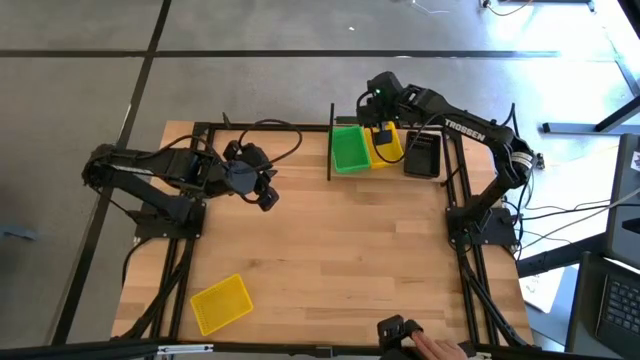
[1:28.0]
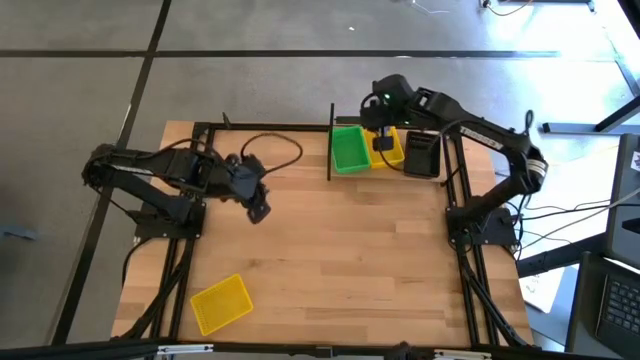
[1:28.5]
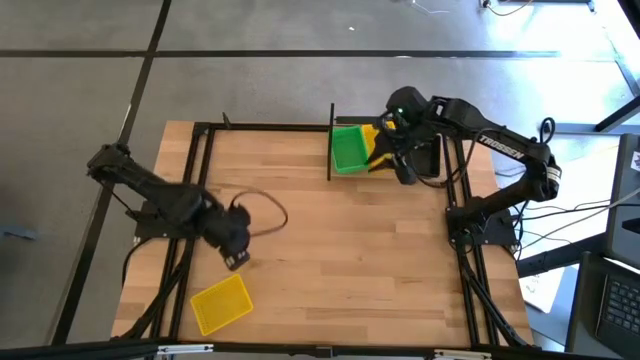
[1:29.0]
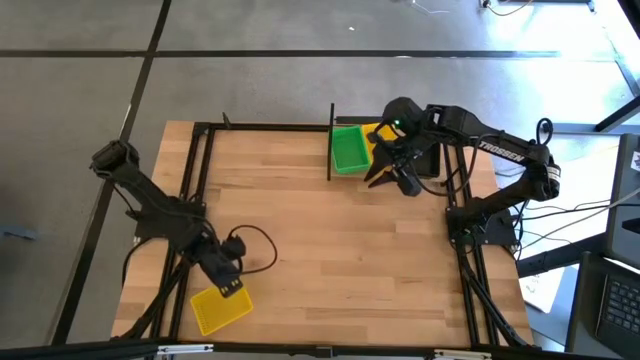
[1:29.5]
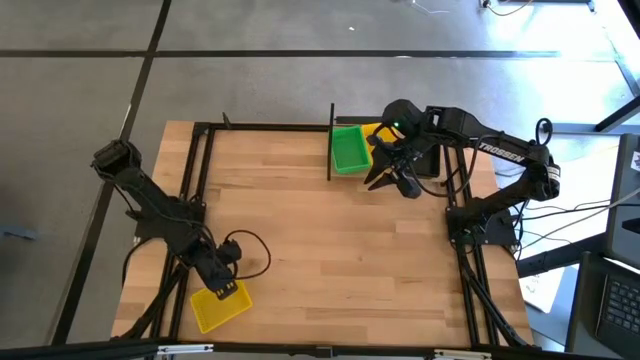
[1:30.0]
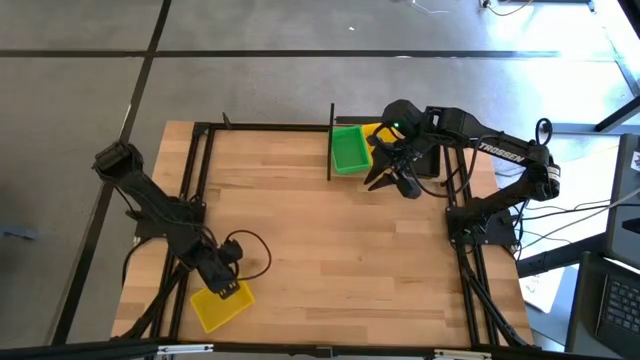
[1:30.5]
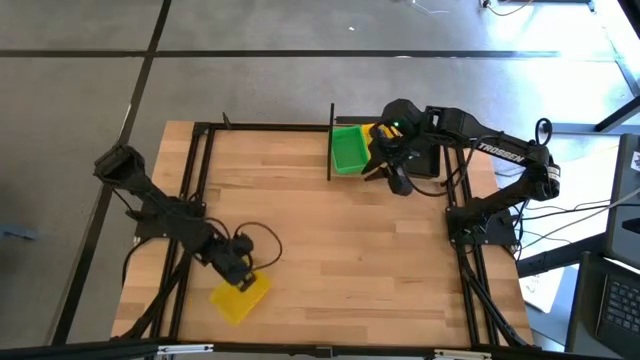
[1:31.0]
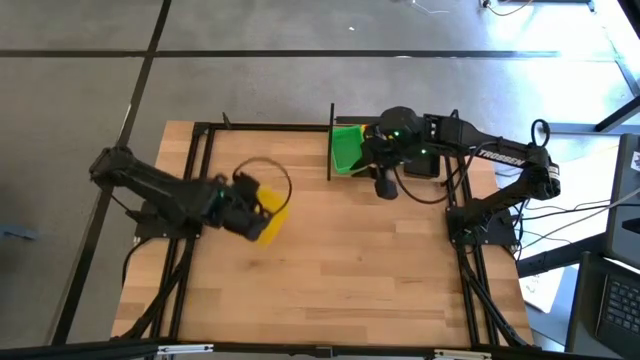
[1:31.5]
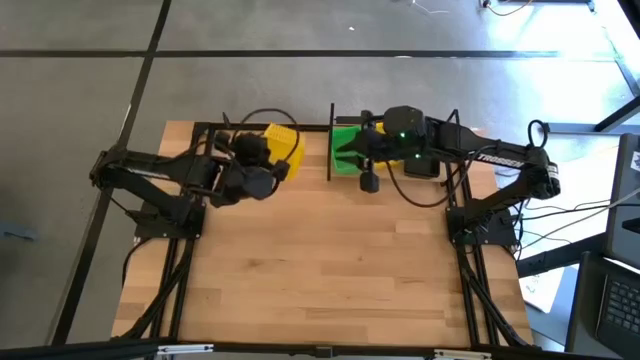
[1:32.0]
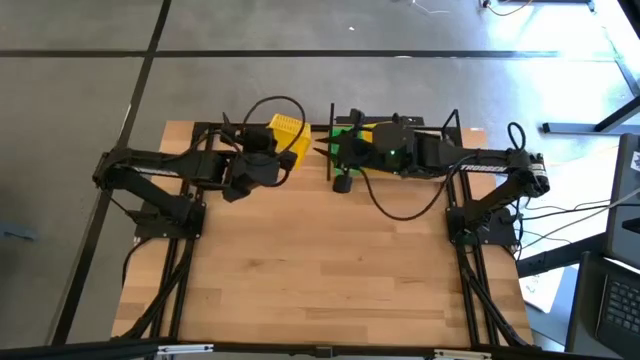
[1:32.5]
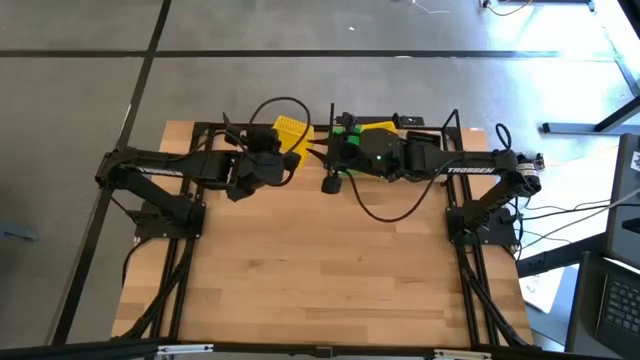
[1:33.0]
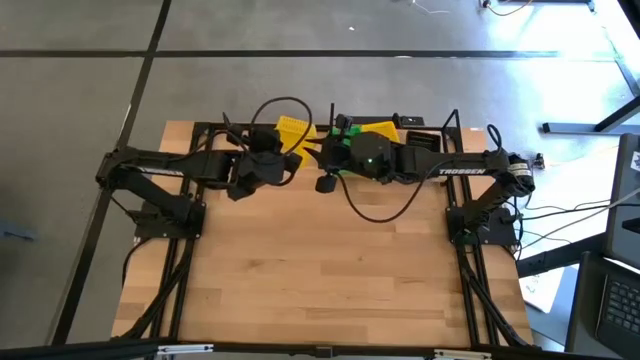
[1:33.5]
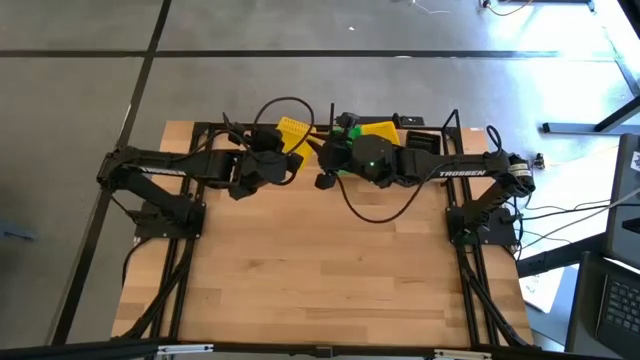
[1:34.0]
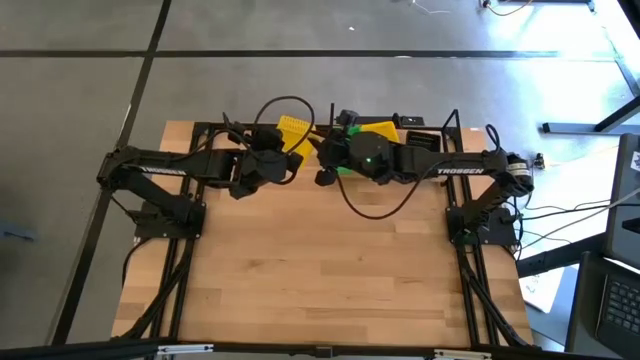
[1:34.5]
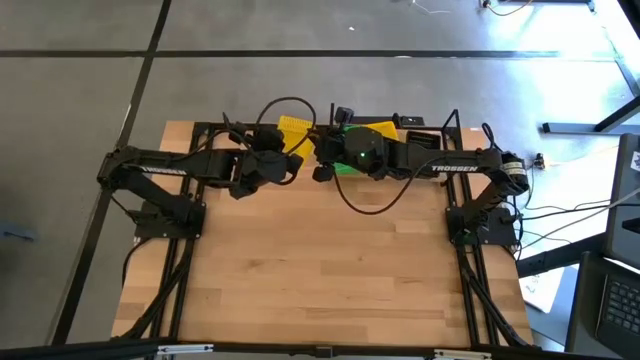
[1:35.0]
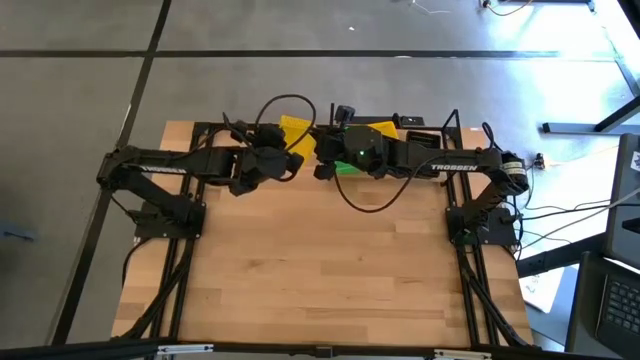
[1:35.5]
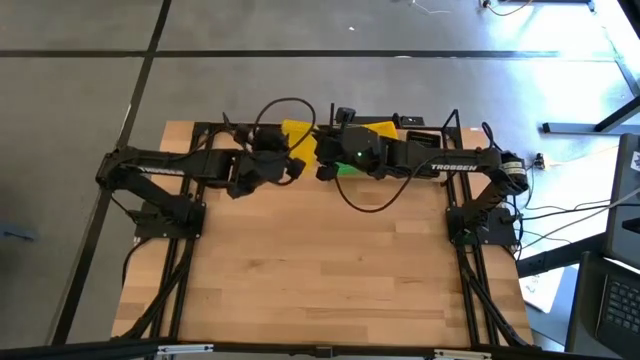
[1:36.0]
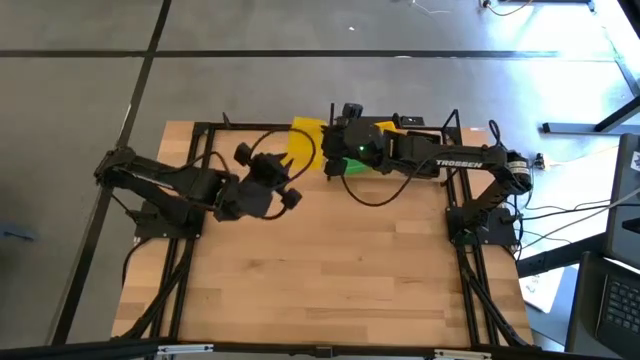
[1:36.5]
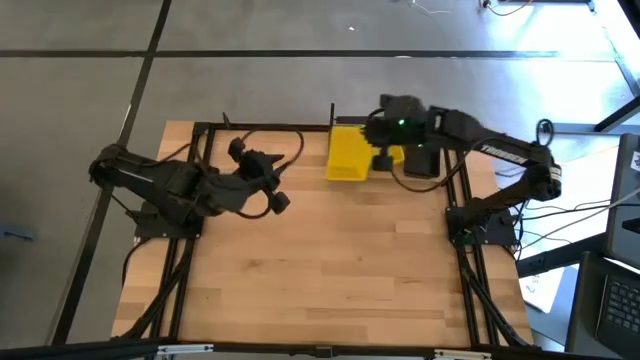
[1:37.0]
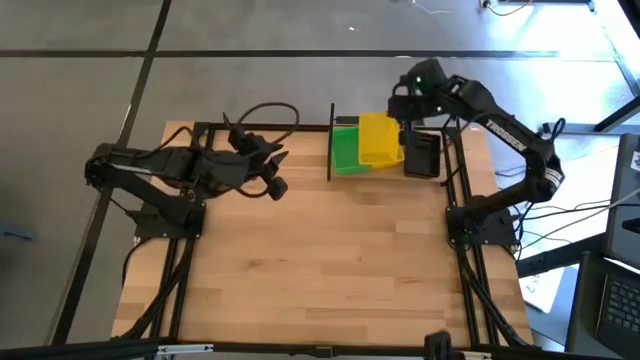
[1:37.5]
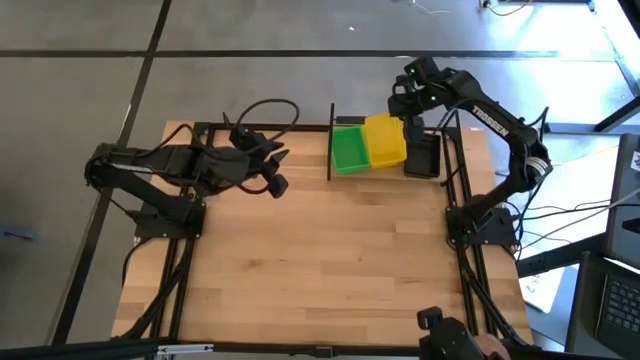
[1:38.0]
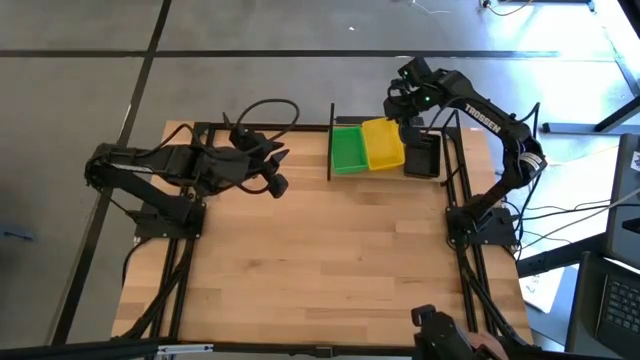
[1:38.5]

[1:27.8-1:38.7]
Task: Stack baskets on shelf by color
Stack the yellow bin on the yellow bin on the shelf

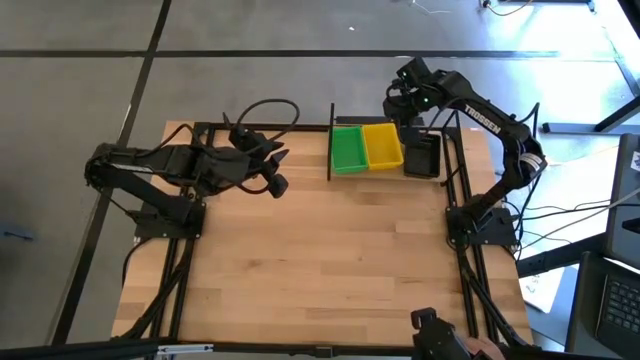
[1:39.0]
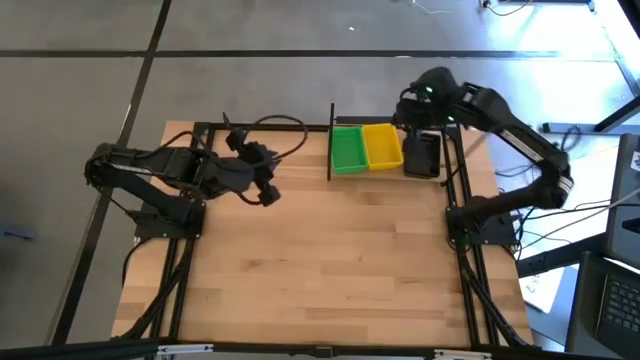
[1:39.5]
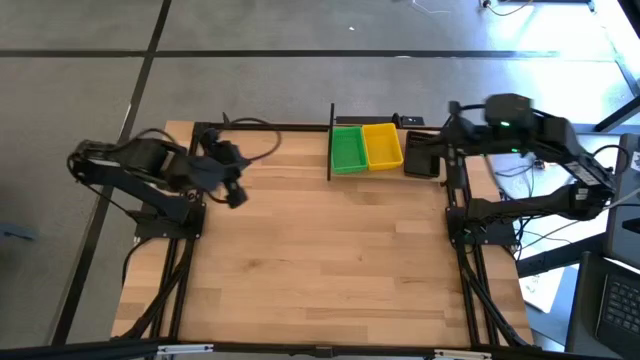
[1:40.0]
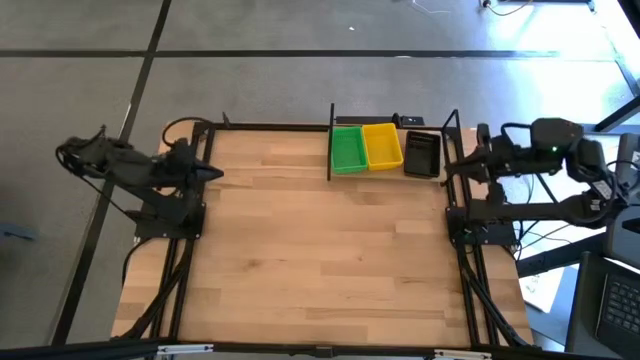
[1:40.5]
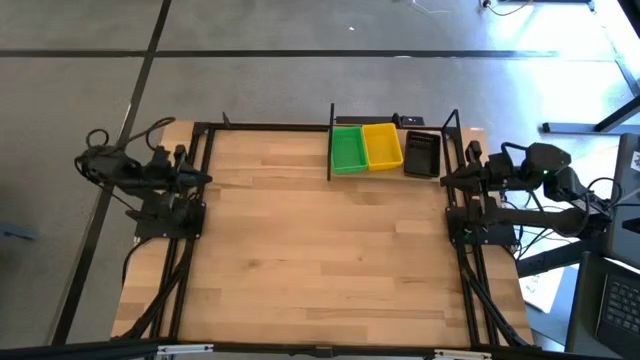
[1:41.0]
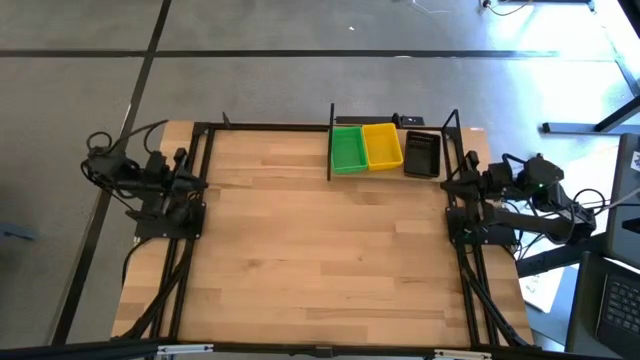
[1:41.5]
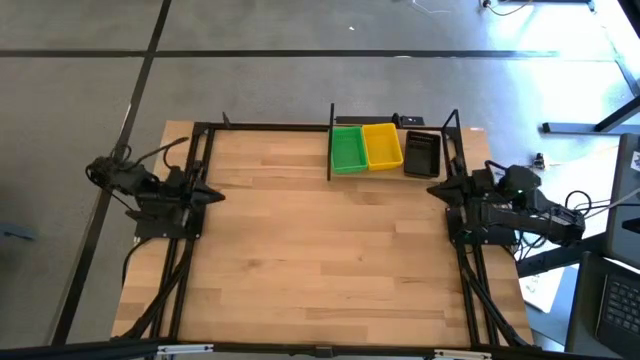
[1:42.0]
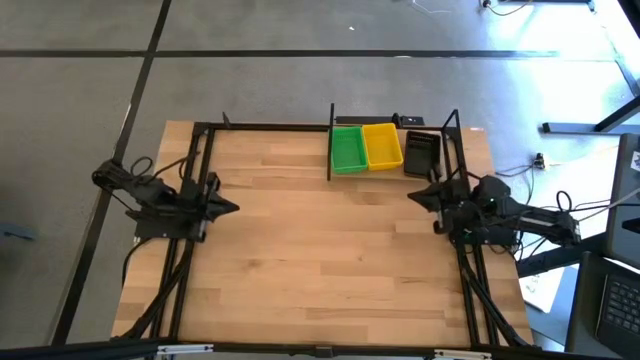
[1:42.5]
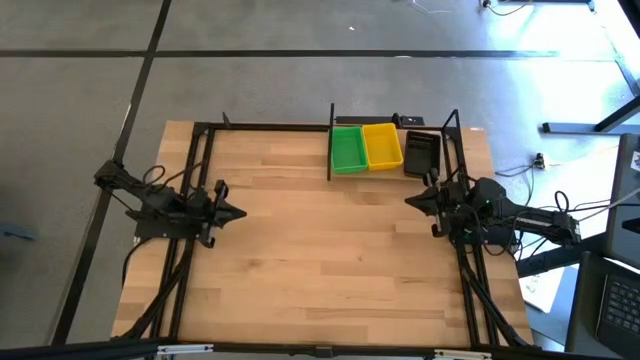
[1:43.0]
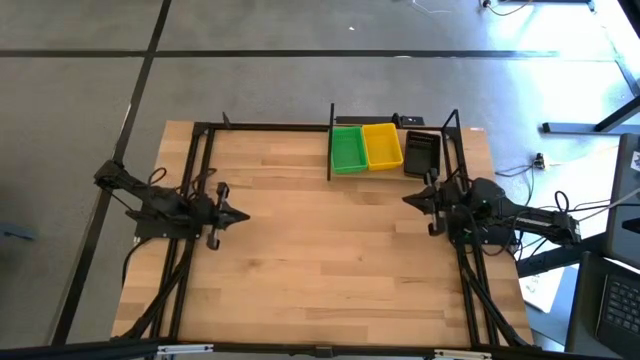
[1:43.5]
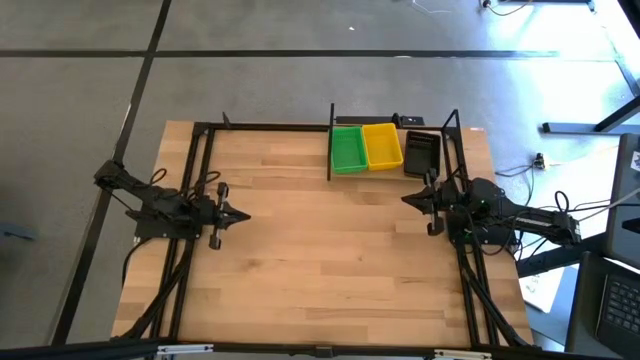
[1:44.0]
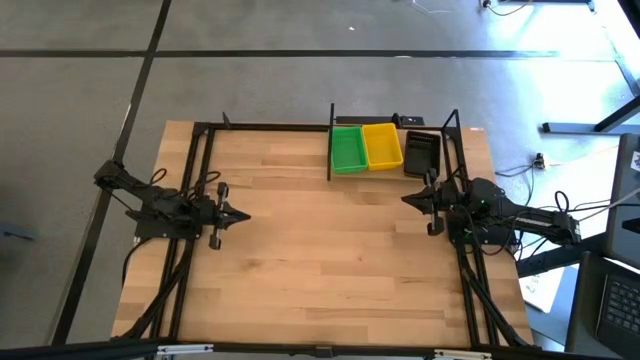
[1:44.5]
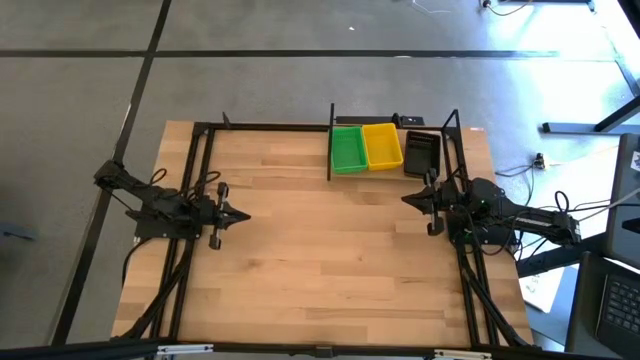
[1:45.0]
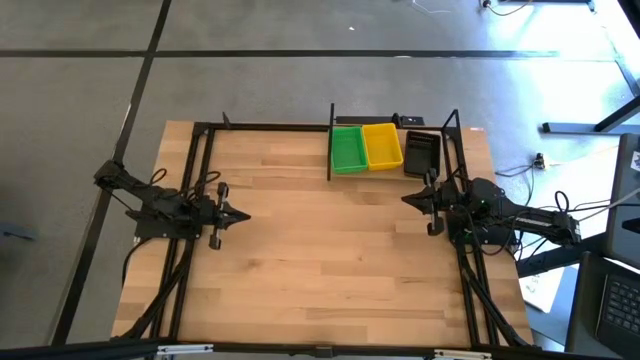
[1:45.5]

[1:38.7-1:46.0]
Return to Home Position

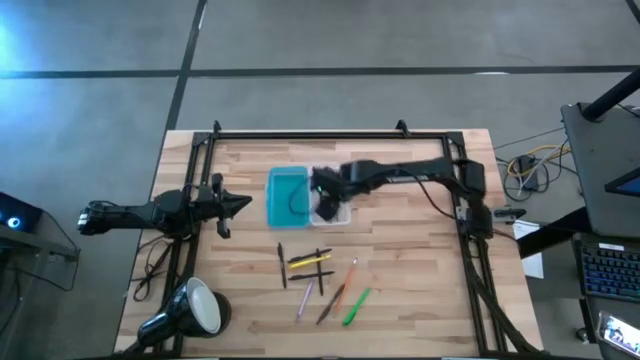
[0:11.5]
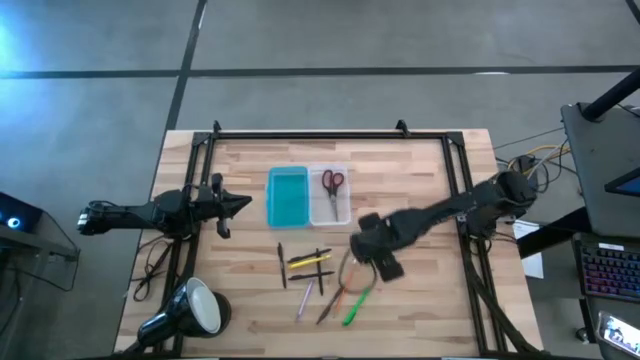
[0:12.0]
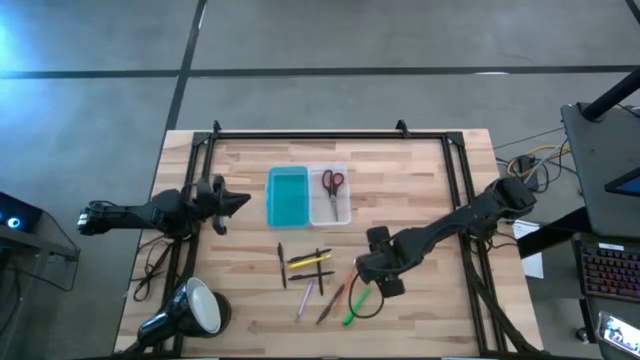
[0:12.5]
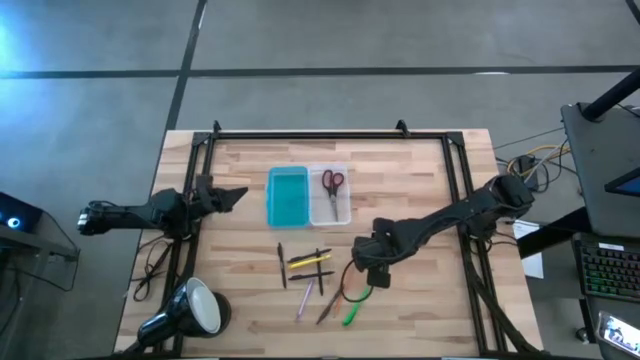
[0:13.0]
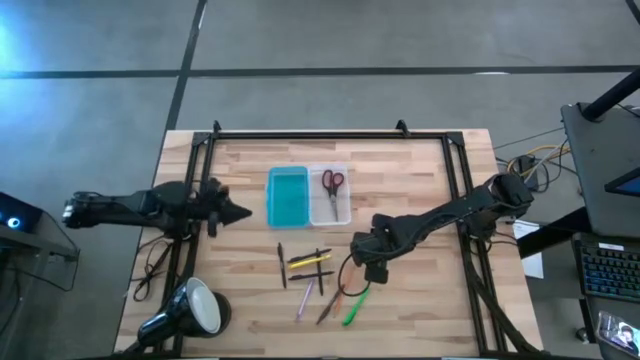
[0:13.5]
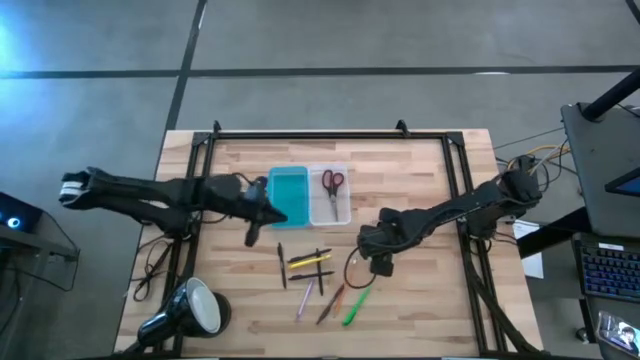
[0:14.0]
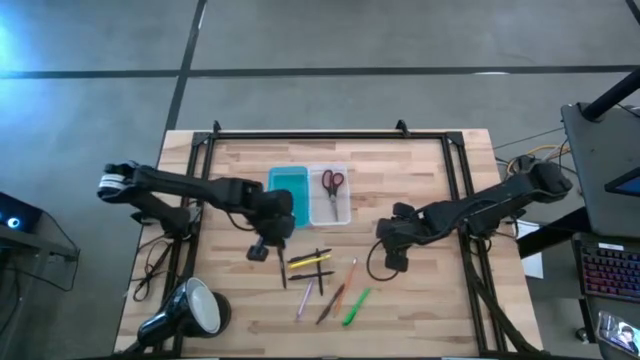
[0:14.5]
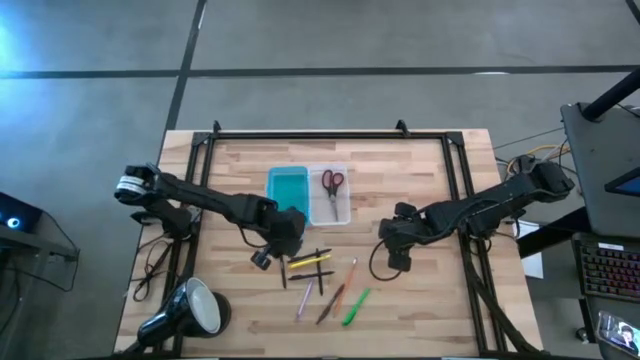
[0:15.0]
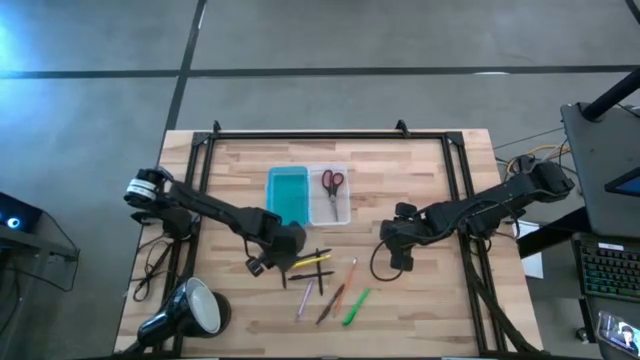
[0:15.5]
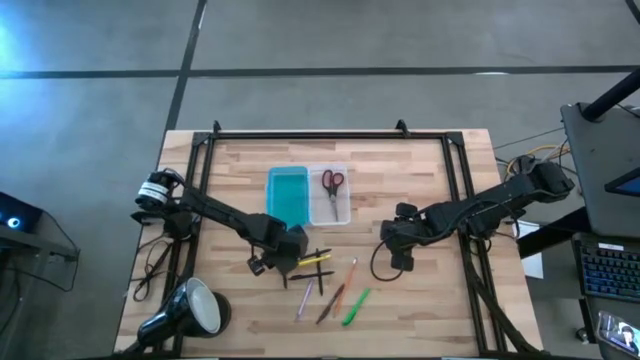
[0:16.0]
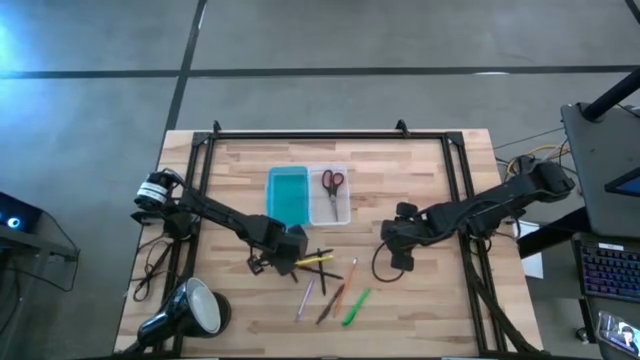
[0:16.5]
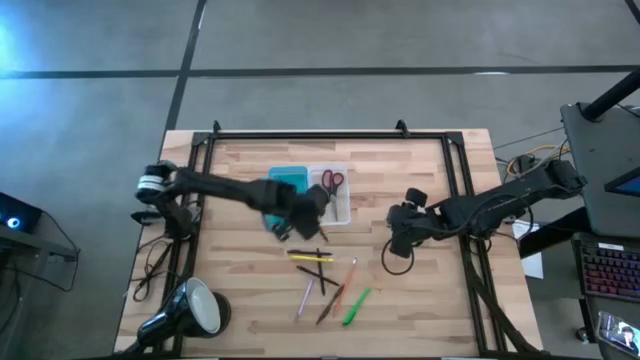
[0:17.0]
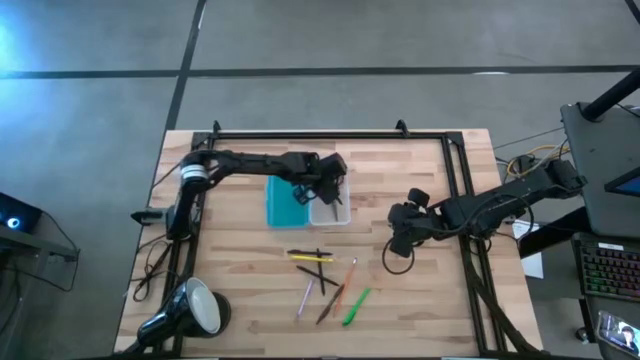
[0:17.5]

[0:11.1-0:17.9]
Task: Pick & place school supplies into a supply box
Put the black pen into the blue supply box
